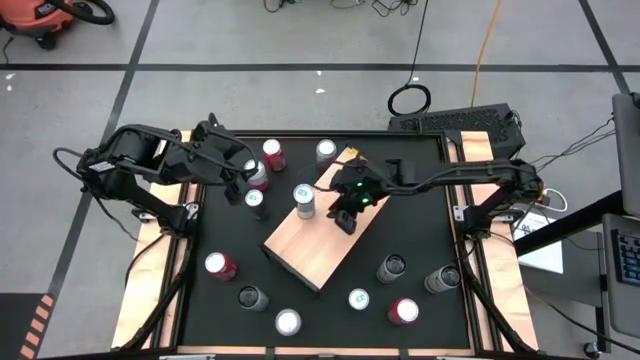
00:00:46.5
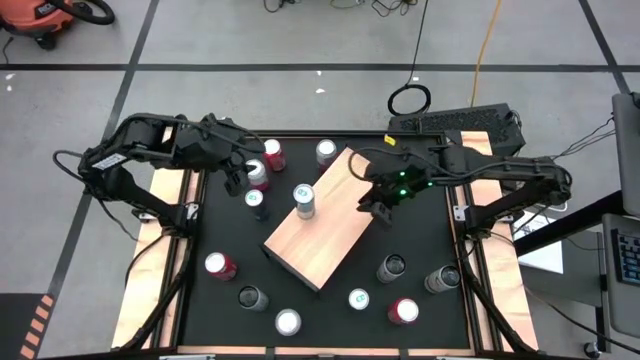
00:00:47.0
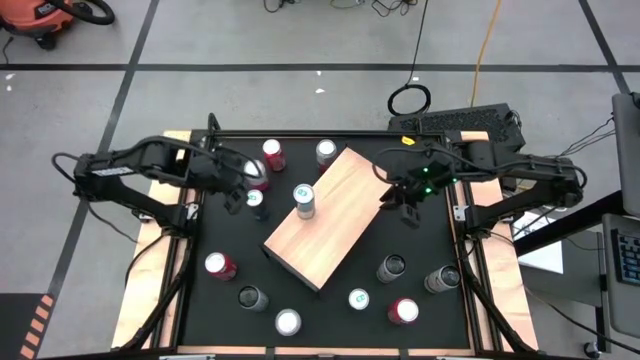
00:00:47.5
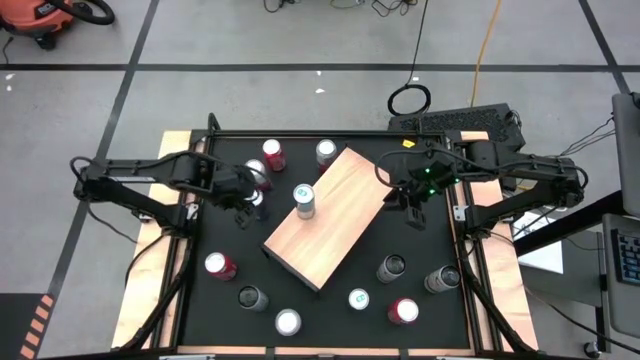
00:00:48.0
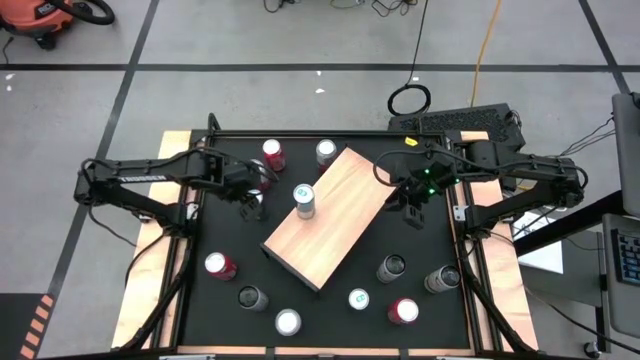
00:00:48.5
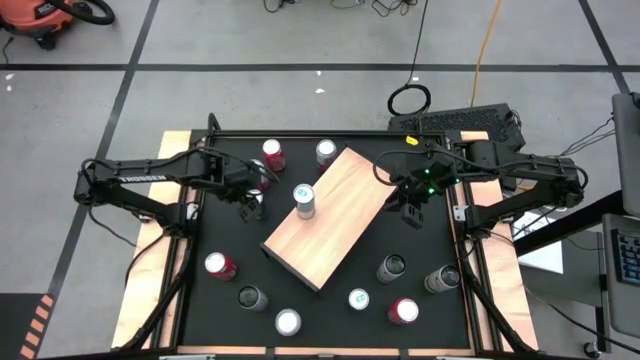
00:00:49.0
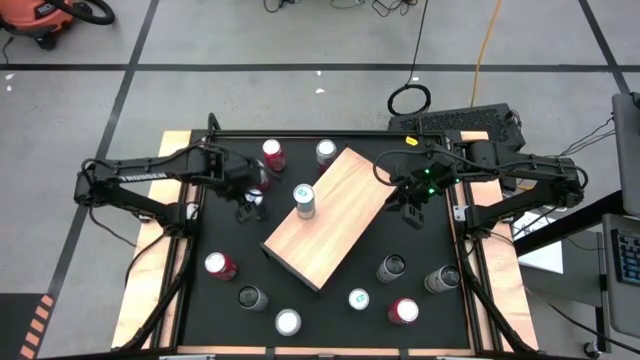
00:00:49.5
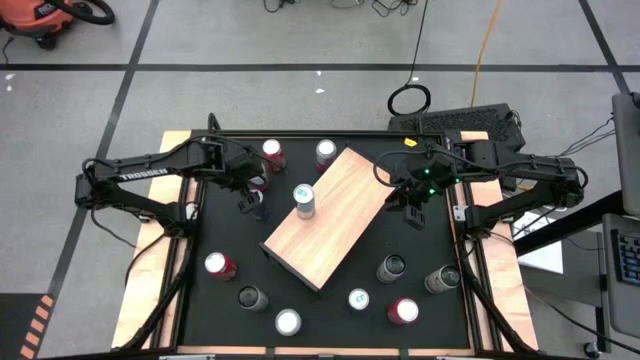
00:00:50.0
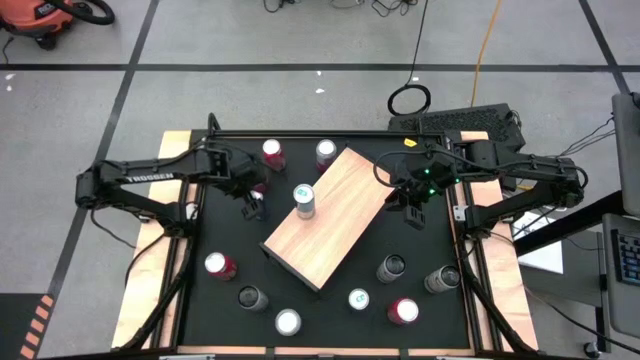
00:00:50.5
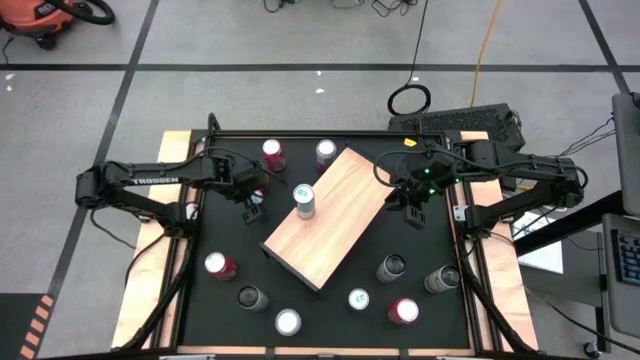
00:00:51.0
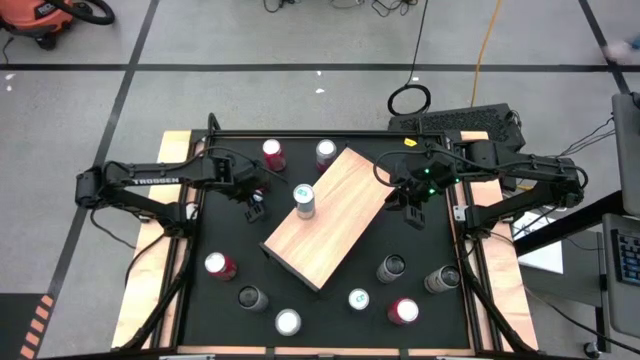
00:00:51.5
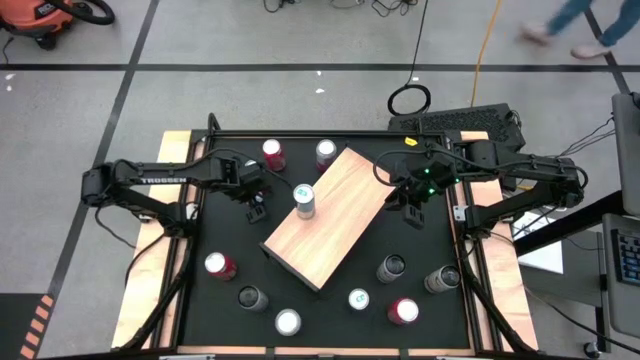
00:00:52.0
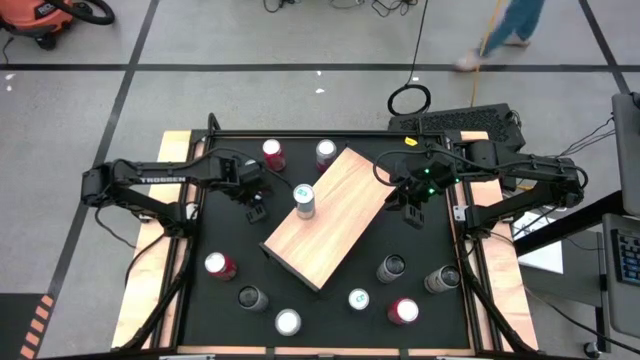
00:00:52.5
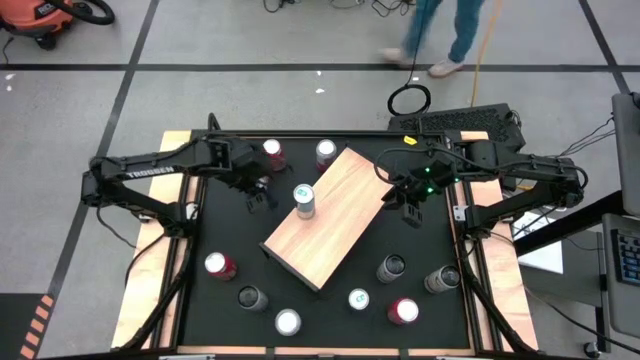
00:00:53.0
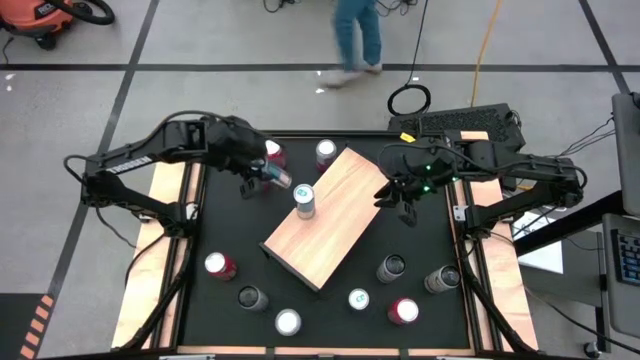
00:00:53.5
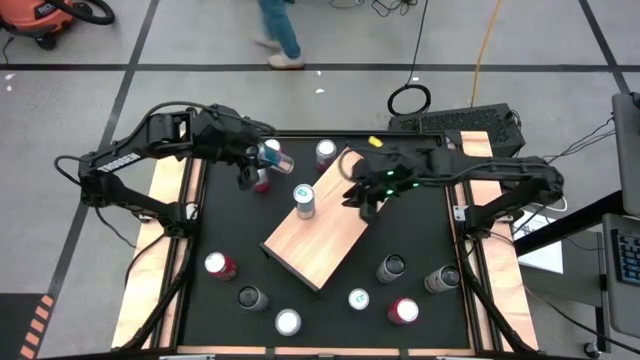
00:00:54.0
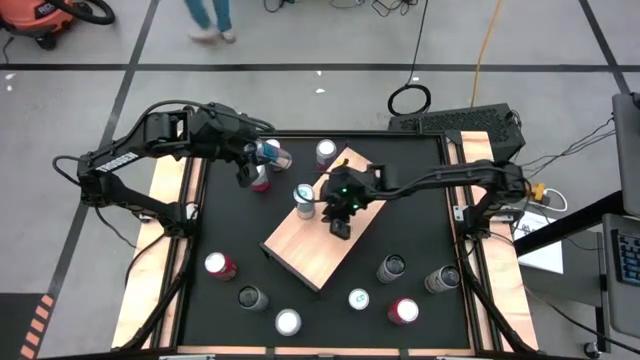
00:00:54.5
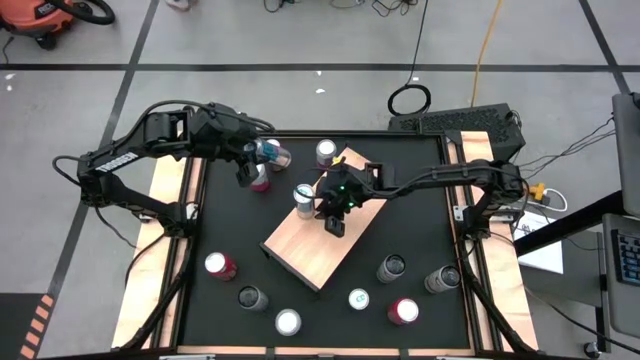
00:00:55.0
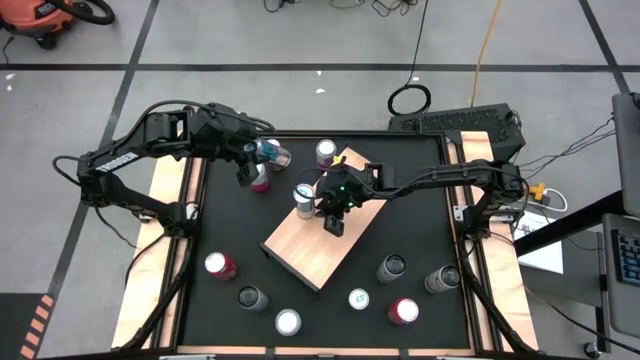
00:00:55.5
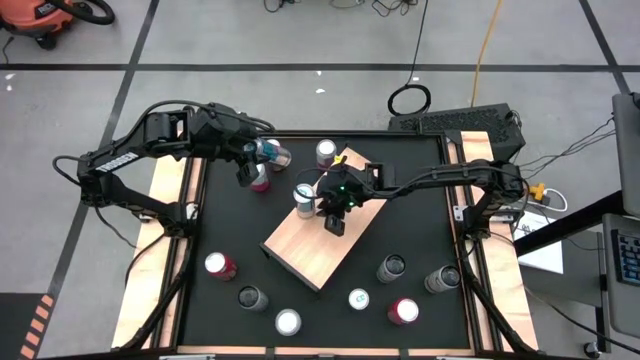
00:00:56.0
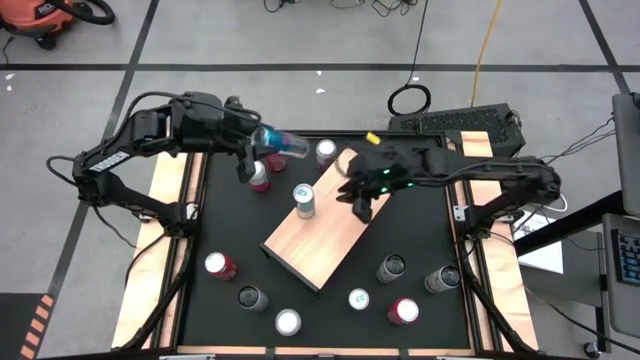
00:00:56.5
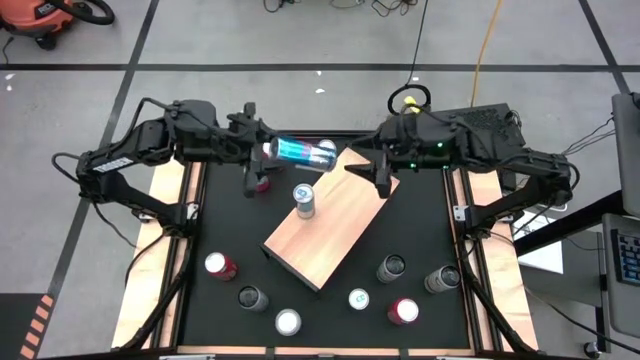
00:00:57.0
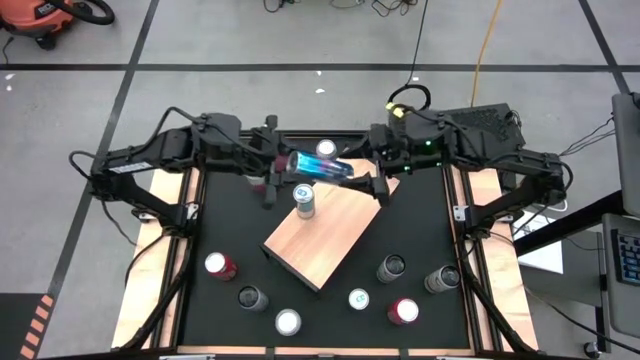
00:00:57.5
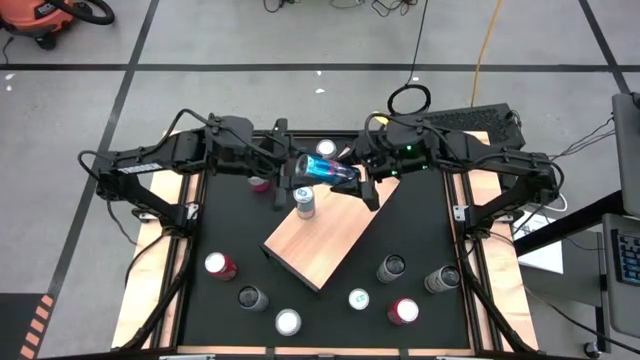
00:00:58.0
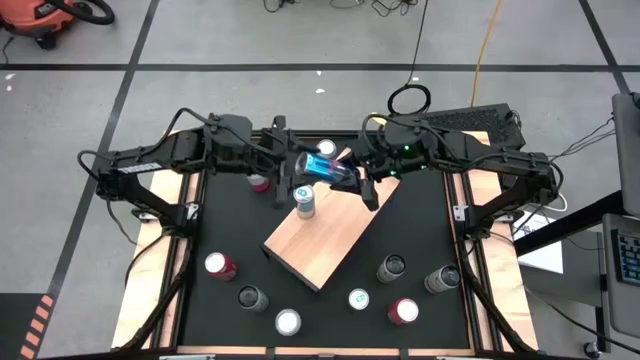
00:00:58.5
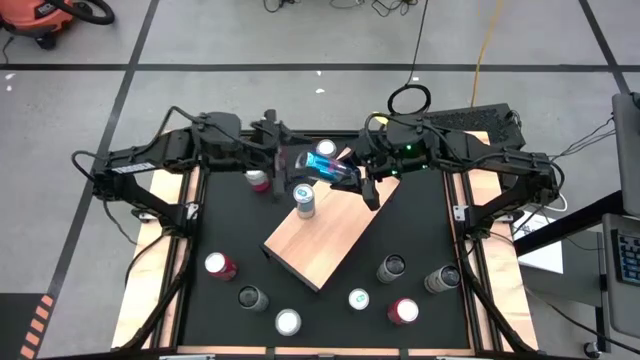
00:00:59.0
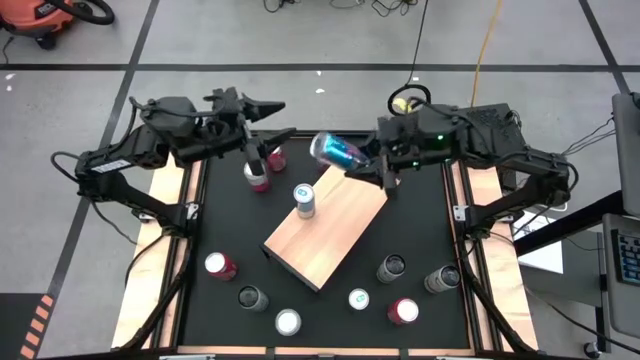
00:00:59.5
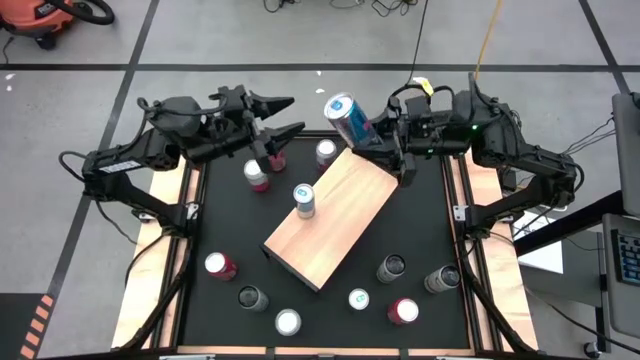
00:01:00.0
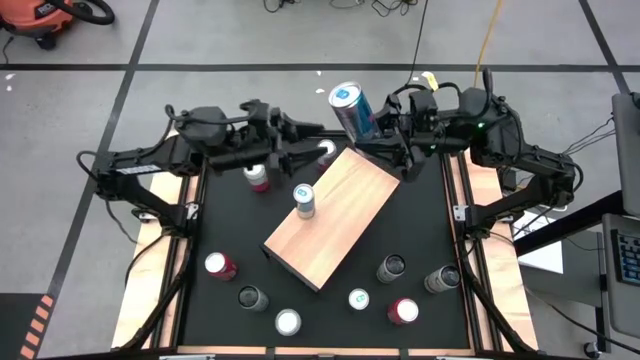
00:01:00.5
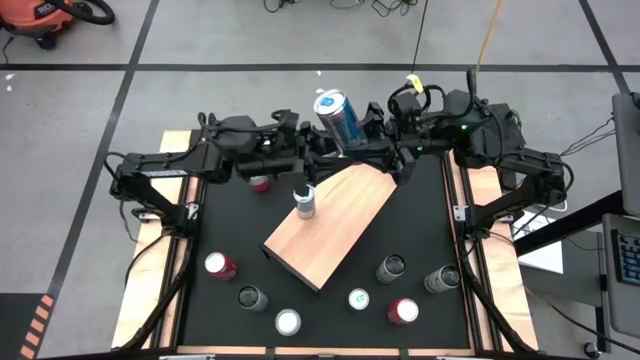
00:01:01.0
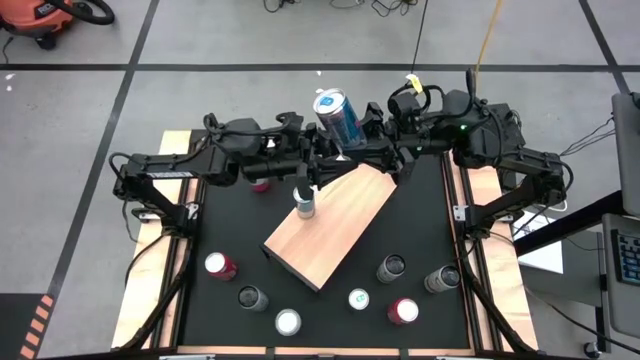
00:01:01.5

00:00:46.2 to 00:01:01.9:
Task: Place canned beverage on shelf
Put the top blue soda can on the shelf aligned with the blue soda can

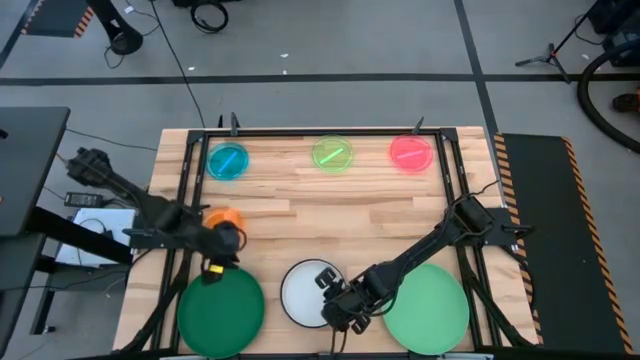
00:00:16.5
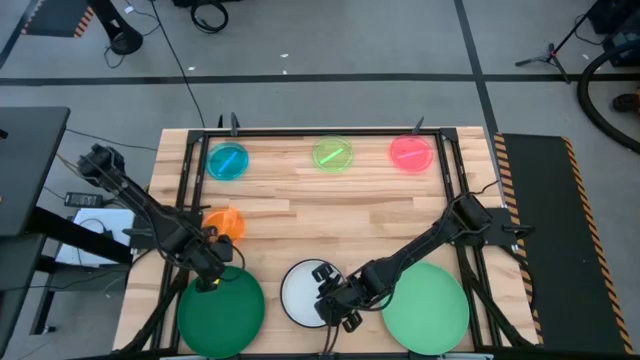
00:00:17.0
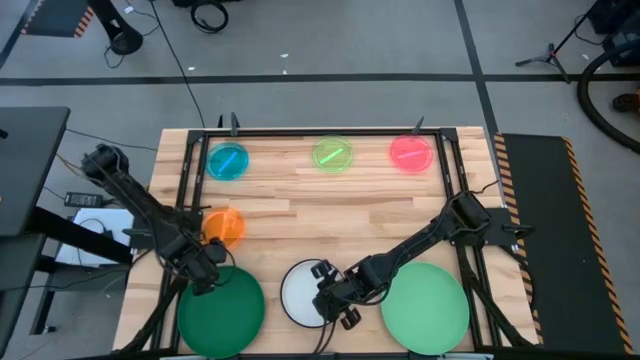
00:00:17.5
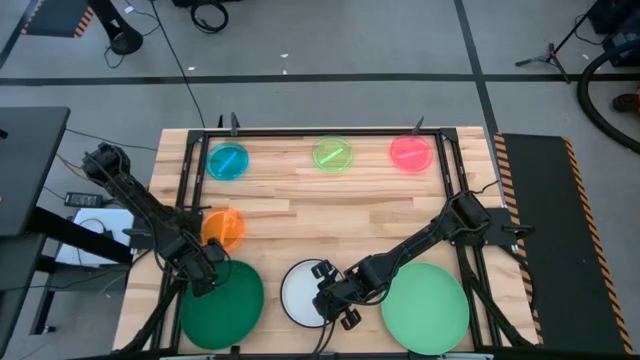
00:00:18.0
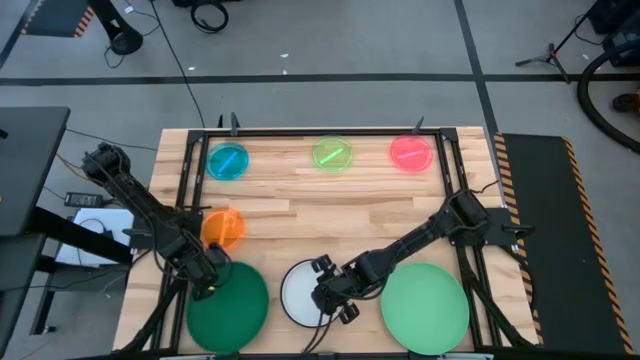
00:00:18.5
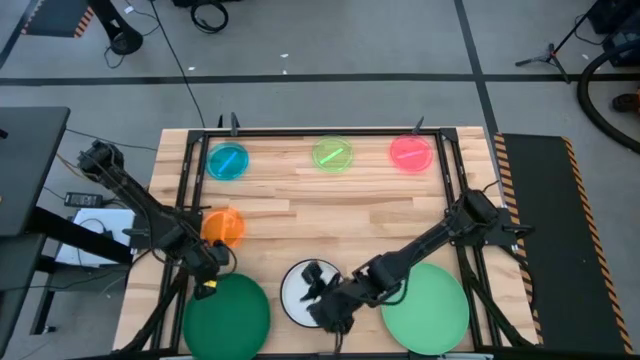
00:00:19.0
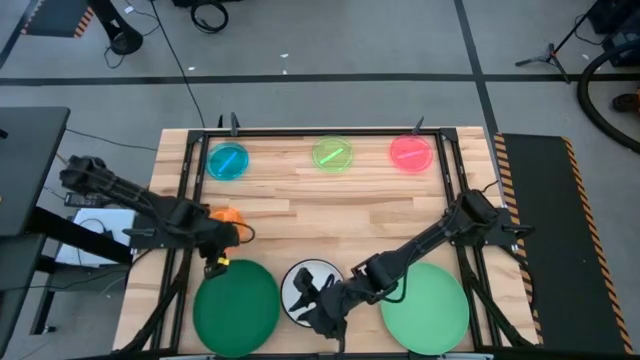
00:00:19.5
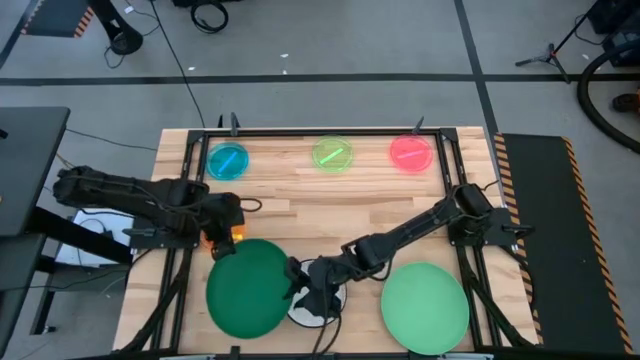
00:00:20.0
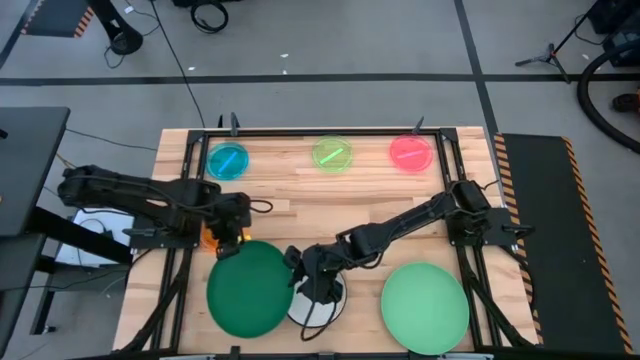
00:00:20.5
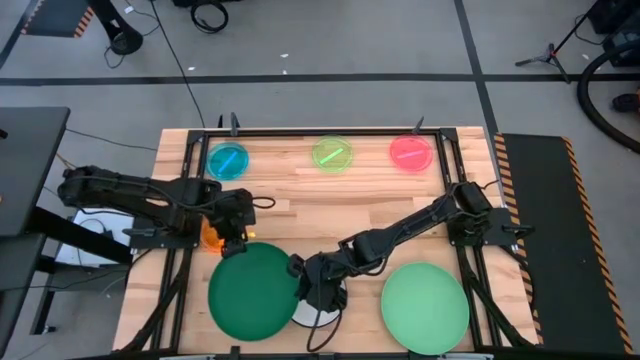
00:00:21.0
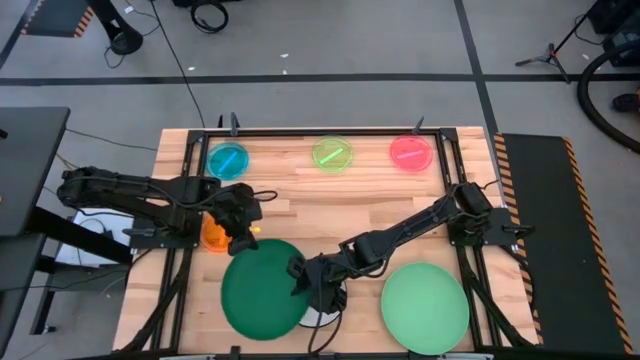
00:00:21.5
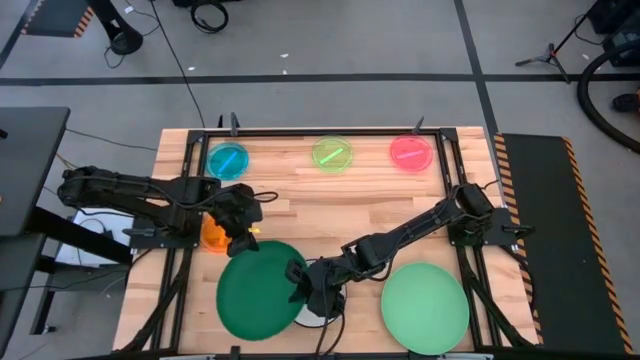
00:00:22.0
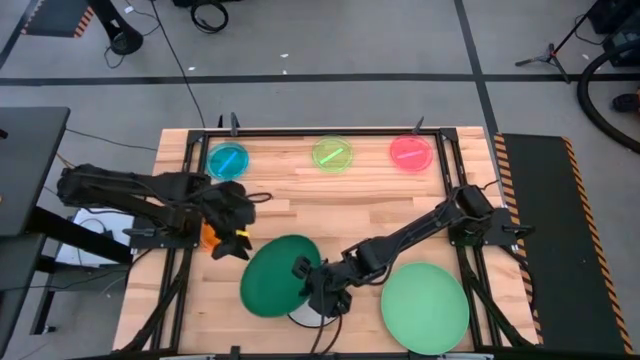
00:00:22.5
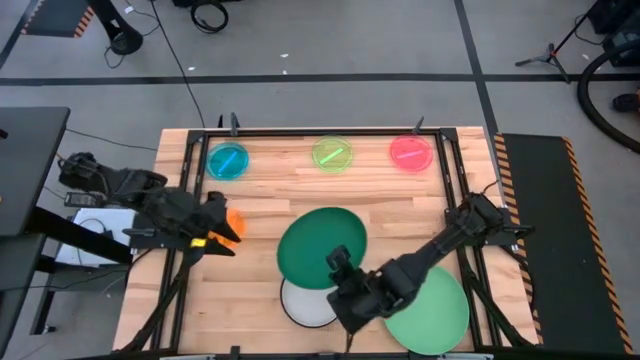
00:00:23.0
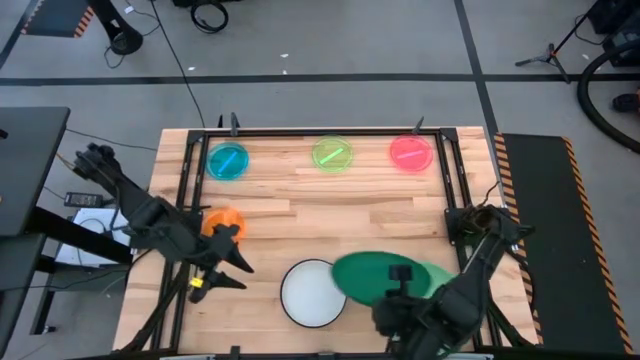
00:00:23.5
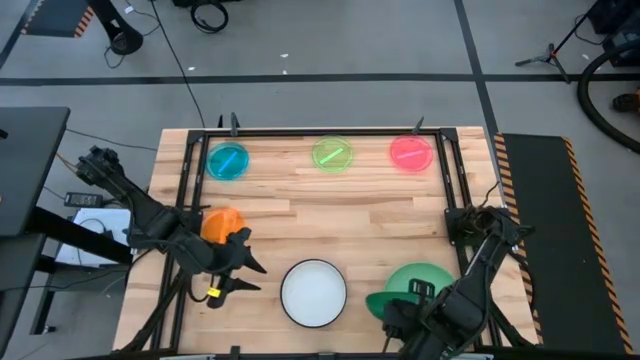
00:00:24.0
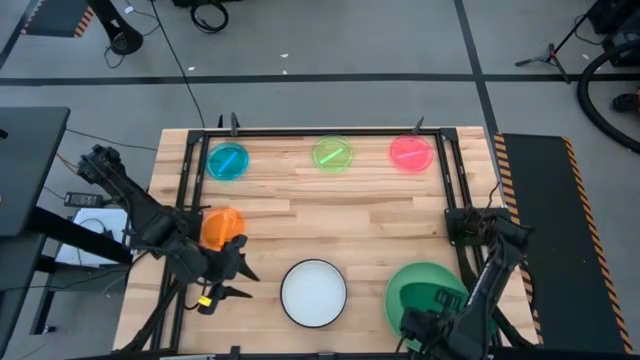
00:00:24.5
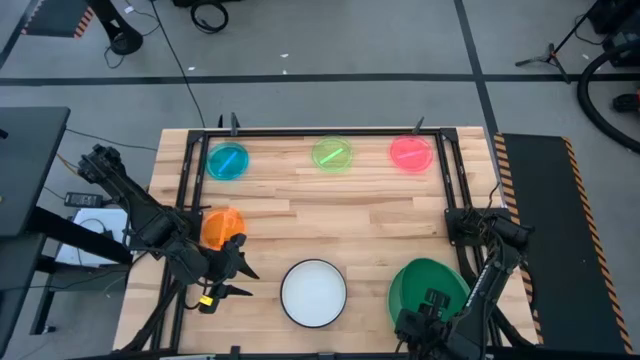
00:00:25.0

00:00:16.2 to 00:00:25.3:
Task: Stack plastic plates
Stack the green plate on top of the light green plate
